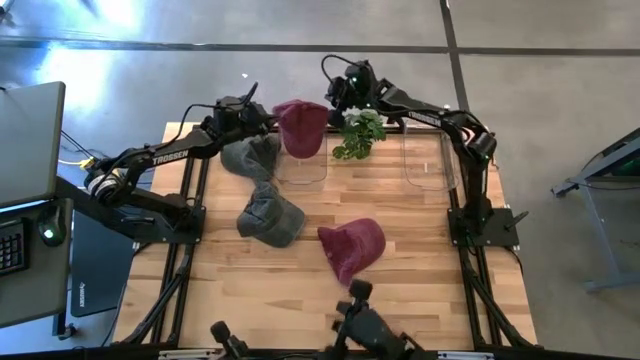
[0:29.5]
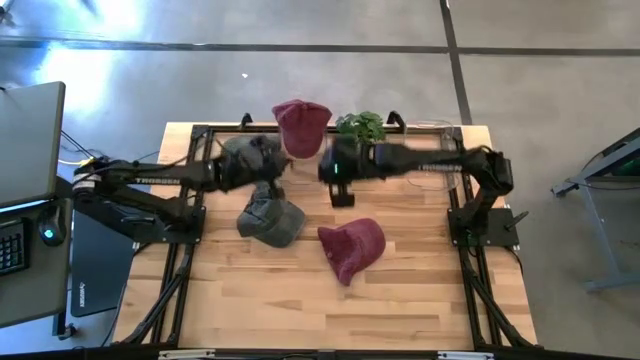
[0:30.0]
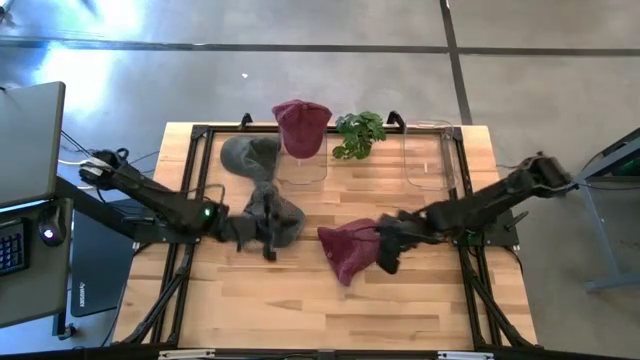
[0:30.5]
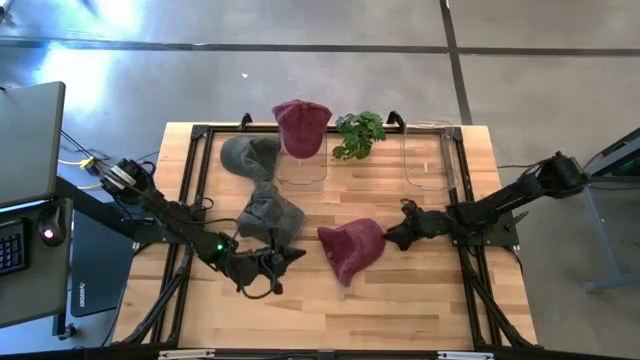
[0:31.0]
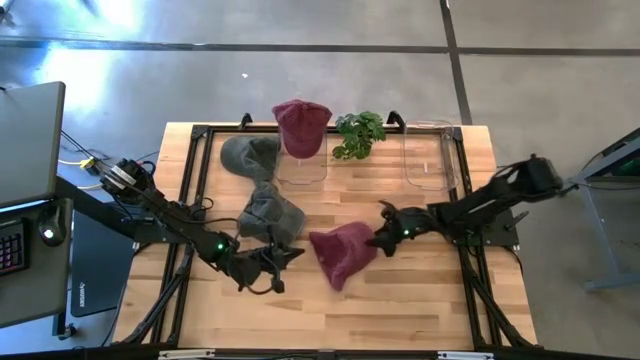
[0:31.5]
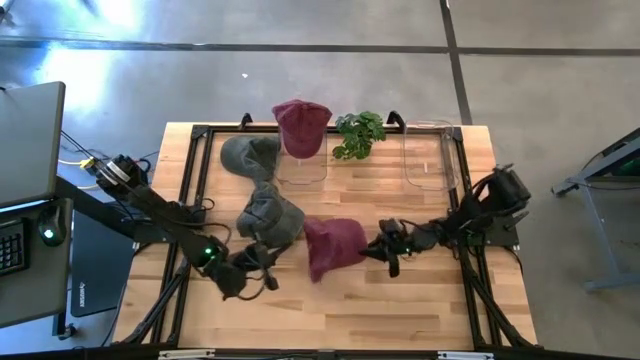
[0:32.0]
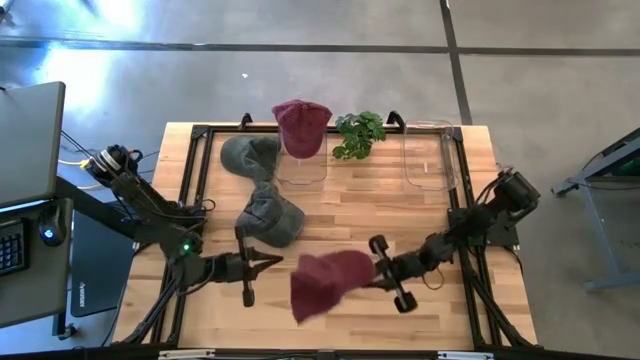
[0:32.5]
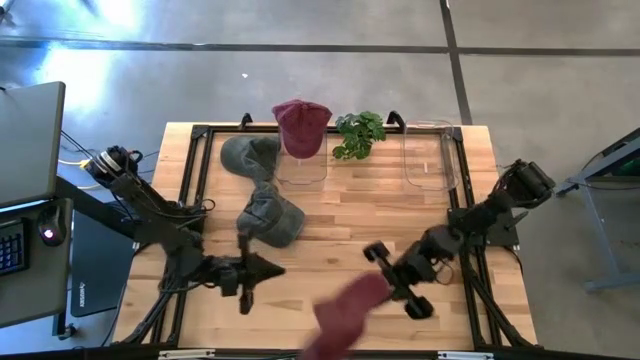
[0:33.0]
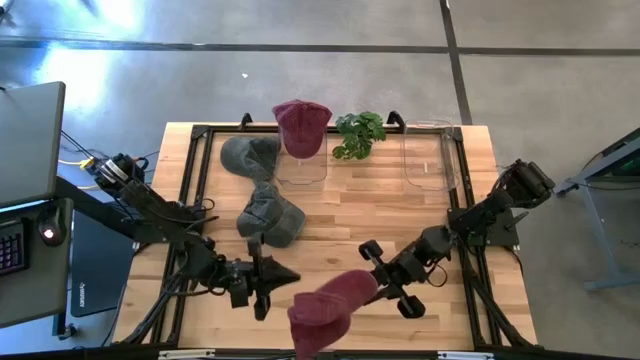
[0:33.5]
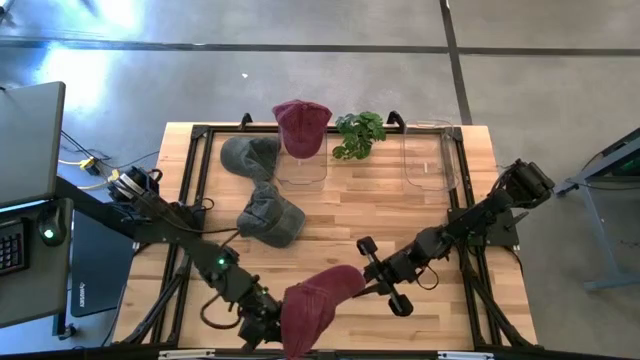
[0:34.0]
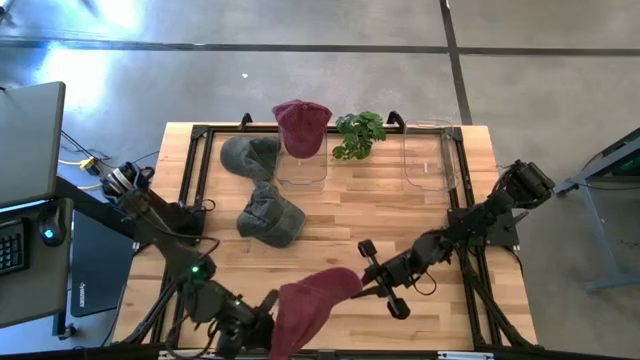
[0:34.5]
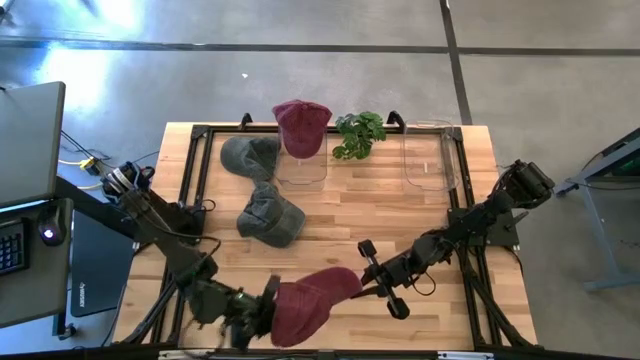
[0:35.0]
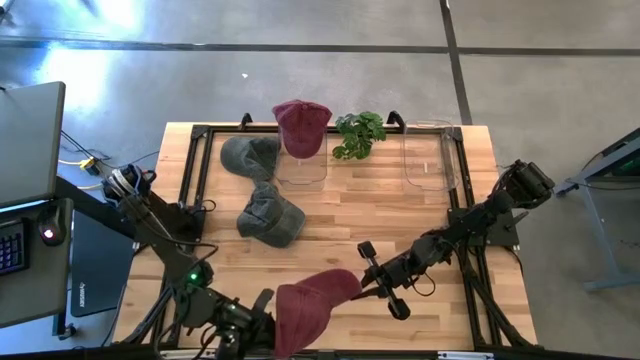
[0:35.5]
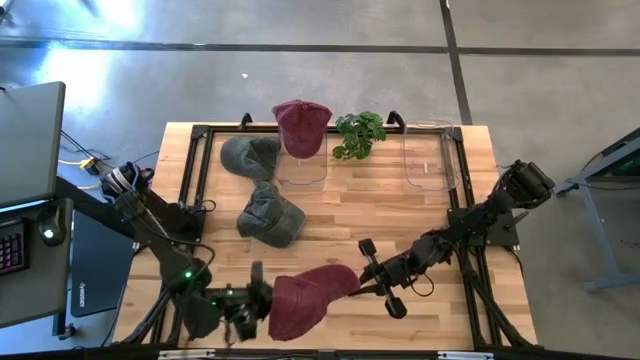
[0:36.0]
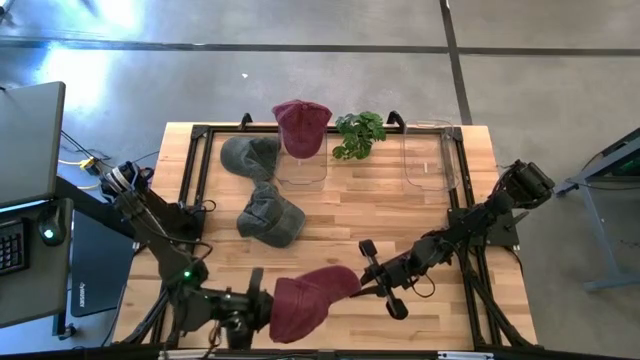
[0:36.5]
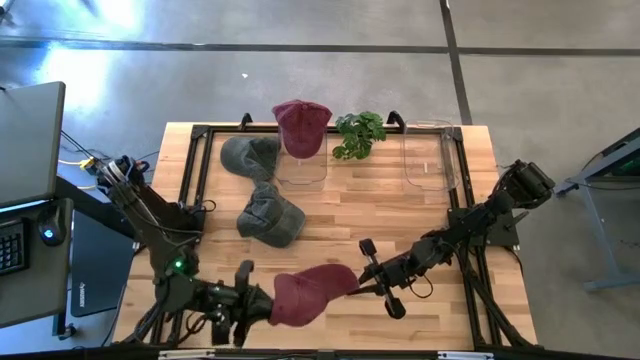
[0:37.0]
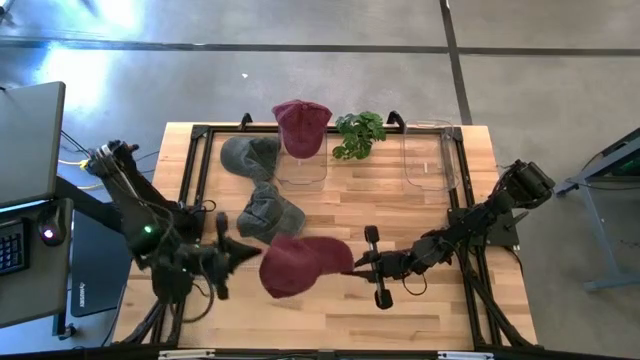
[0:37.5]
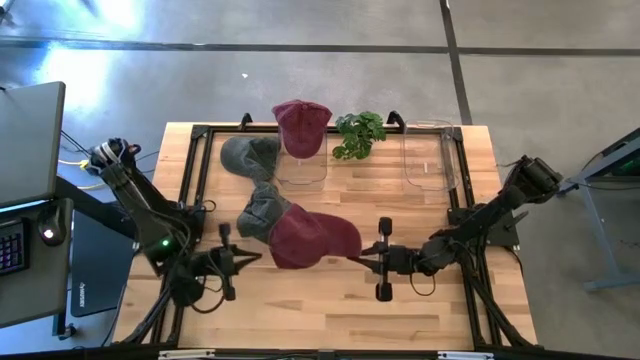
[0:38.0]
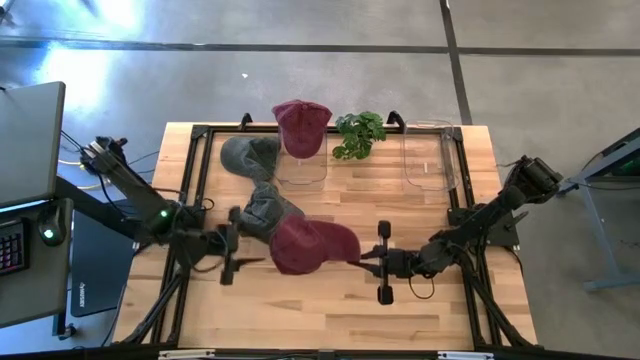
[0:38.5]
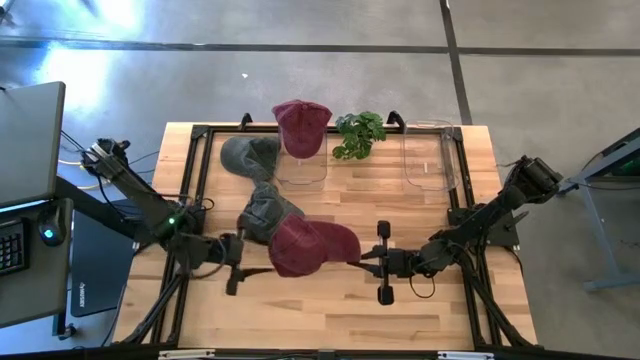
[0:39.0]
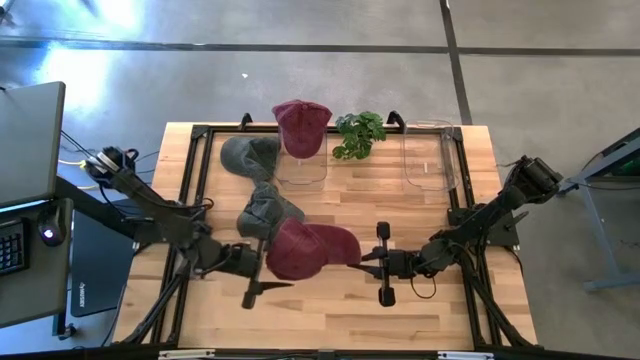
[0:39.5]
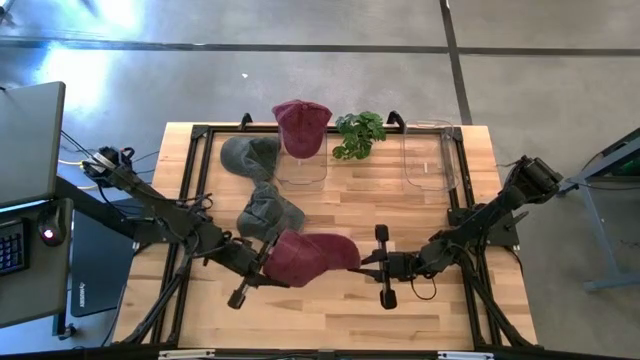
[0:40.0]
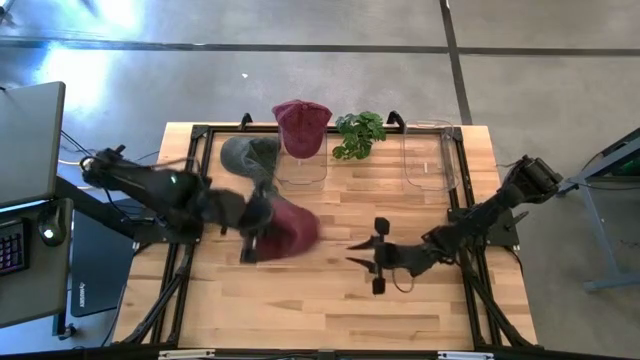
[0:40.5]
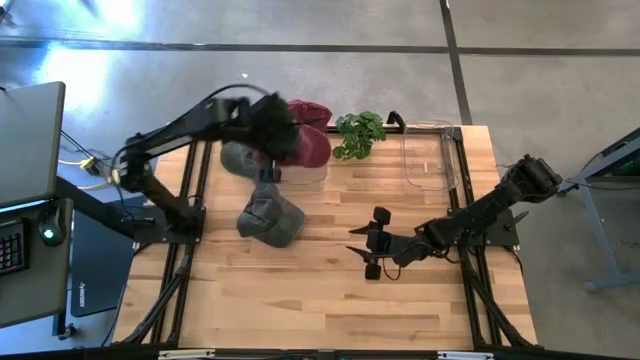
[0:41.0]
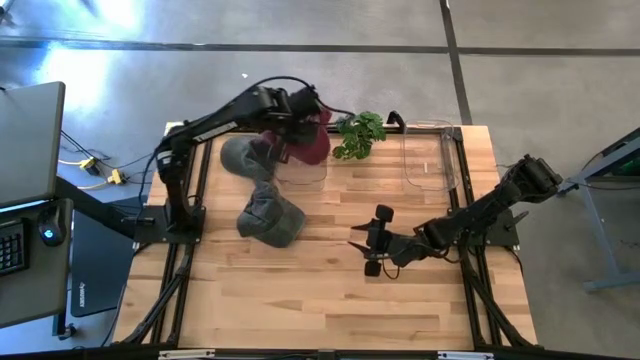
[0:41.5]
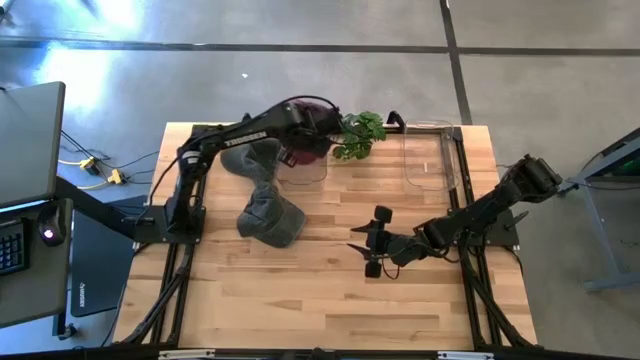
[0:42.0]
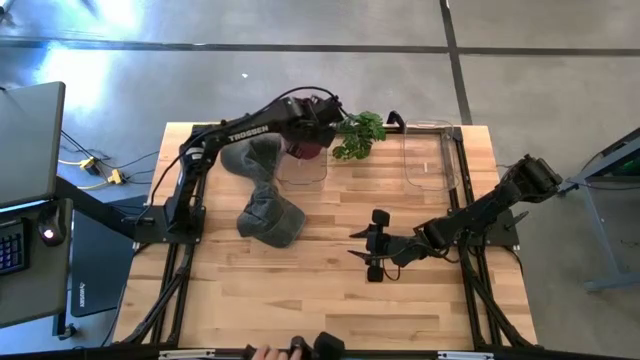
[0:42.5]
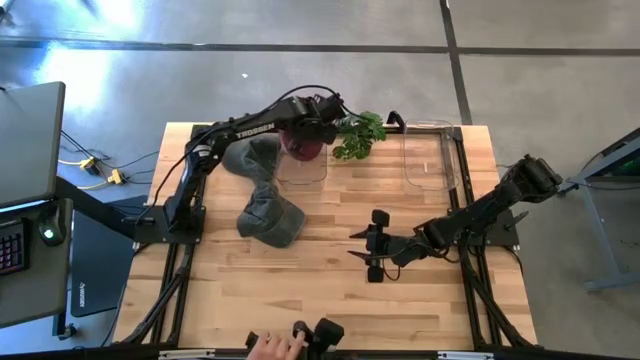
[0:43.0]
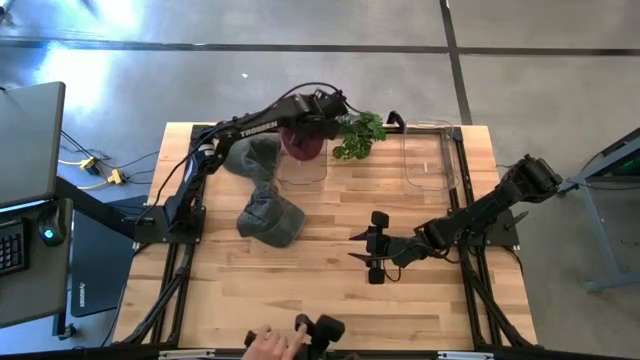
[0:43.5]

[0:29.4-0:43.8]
Task: Pick & Place hat
Put the red cap into the left transparent bin

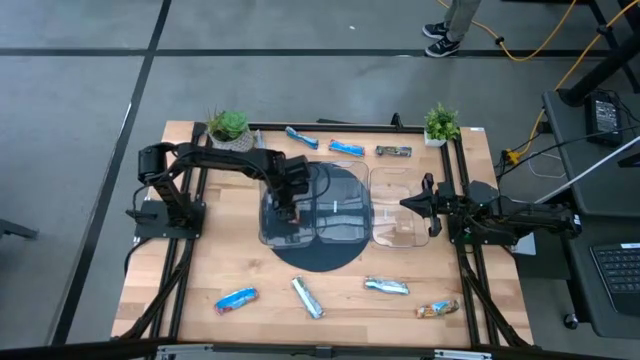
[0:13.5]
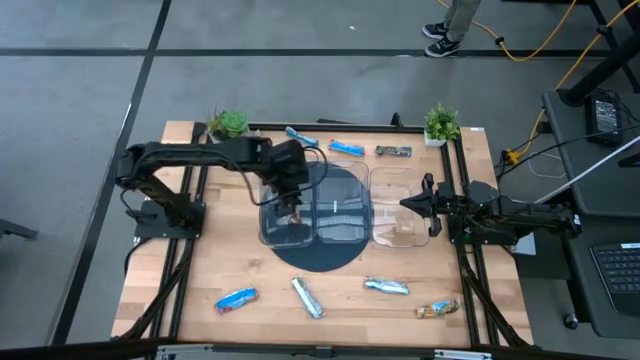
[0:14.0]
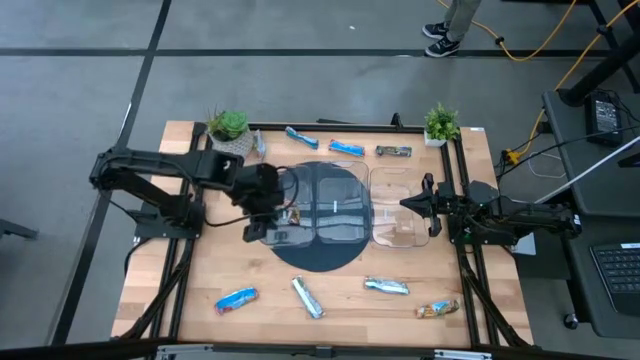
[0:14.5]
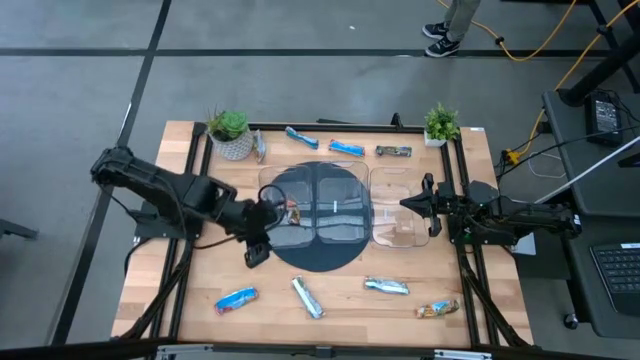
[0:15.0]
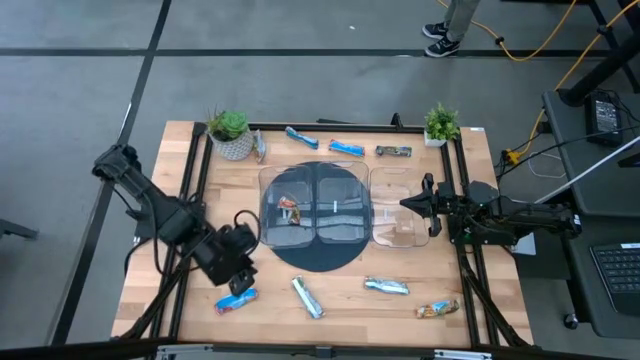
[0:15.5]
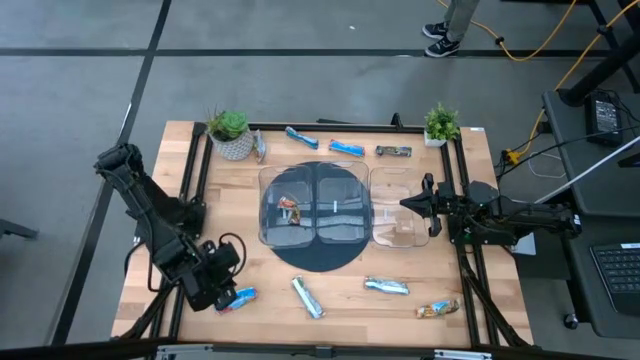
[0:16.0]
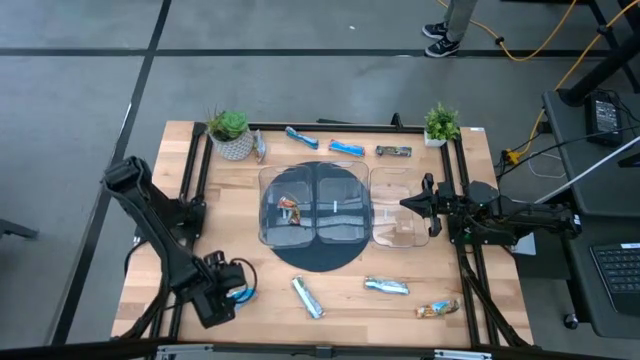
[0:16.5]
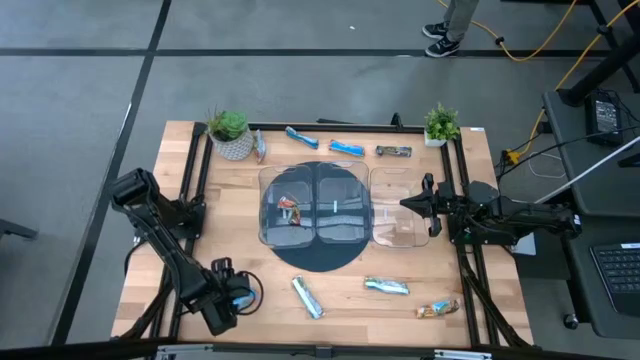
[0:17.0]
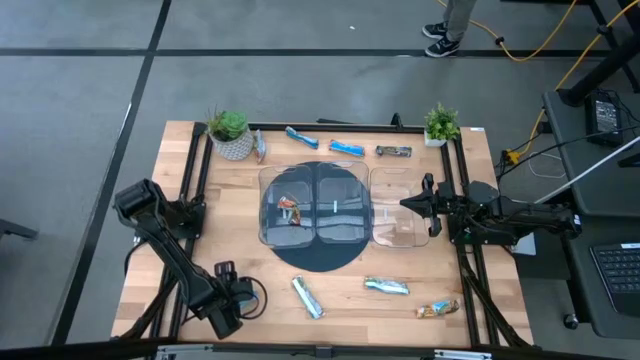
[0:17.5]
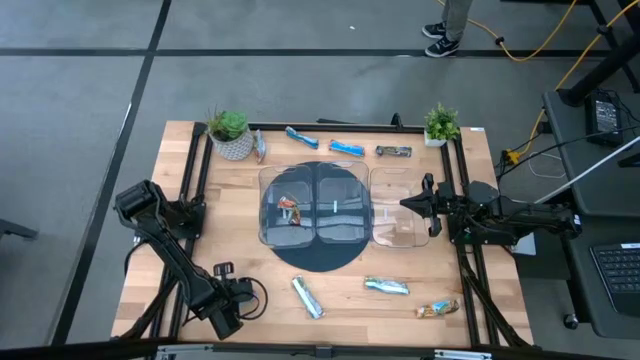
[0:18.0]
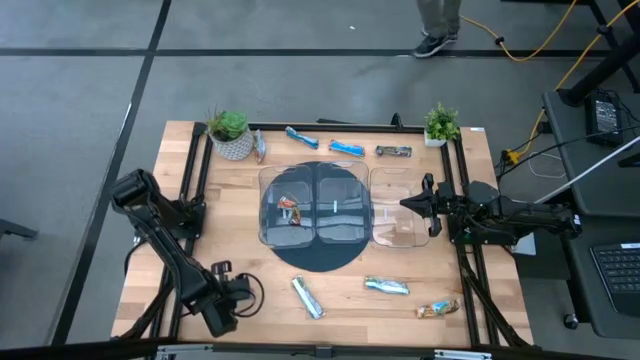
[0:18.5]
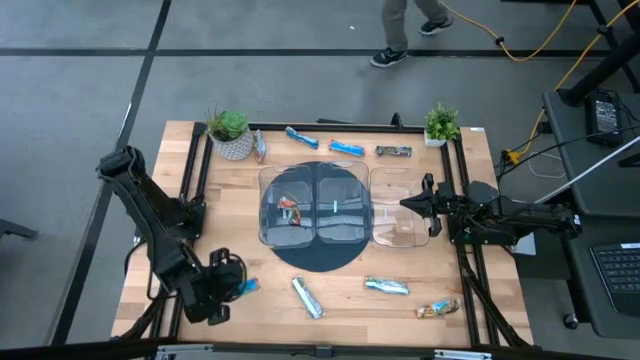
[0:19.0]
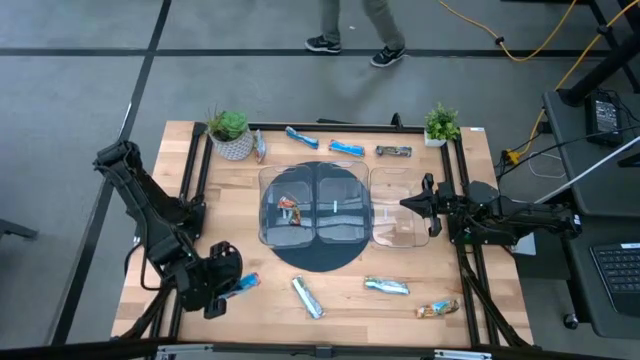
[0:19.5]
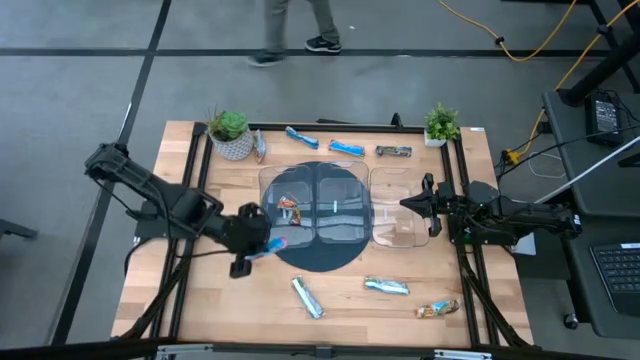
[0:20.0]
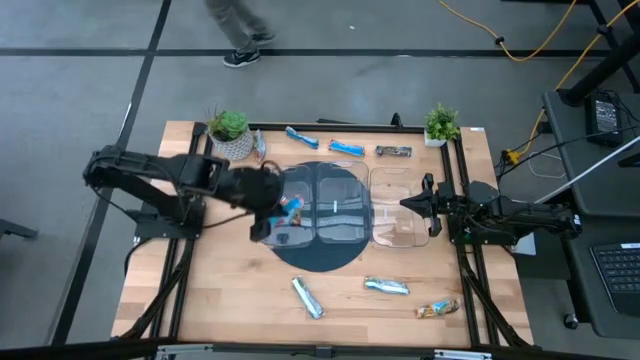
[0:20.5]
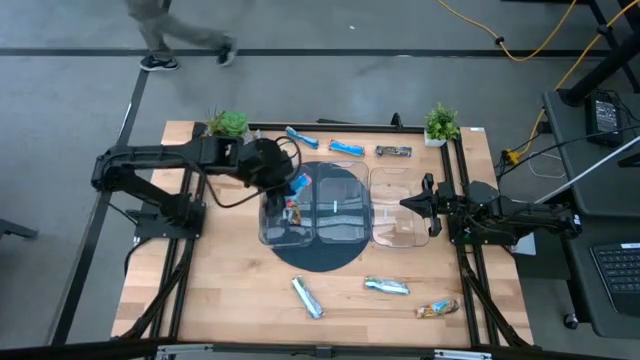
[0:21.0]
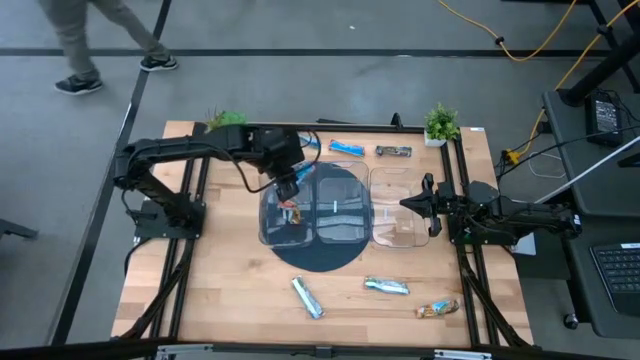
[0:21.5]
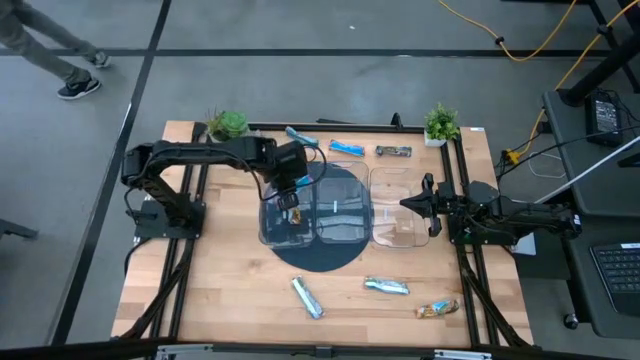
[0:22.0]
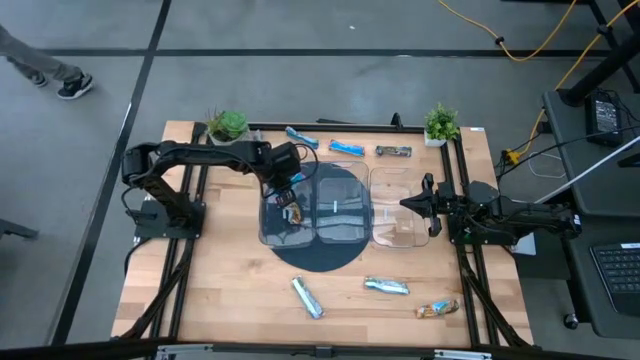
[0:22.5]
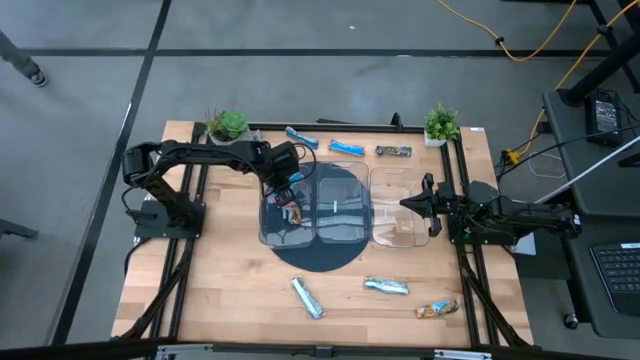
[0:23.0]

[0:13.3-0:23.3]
Task: Pick and place Granola Bars by type
Put the red granola bar into the left transparent bin
